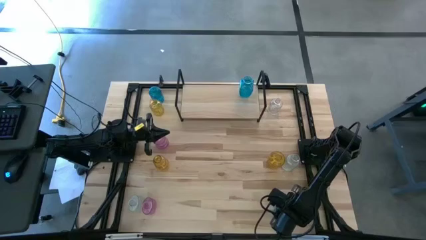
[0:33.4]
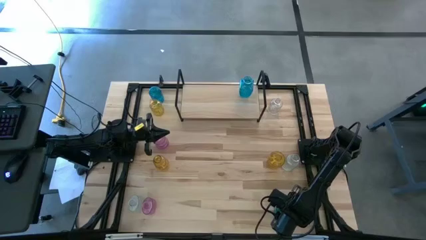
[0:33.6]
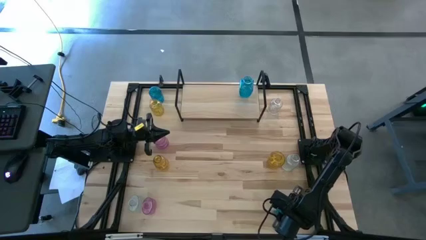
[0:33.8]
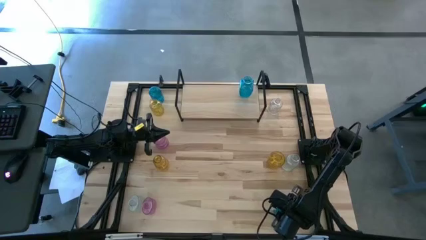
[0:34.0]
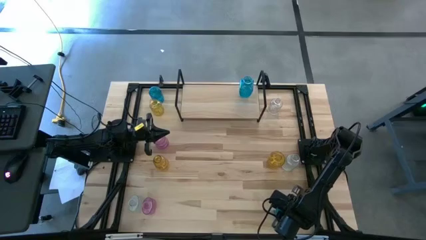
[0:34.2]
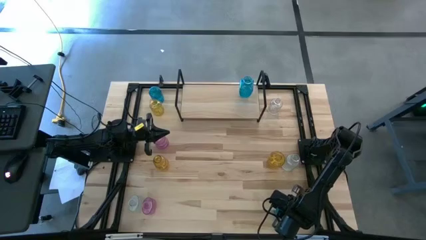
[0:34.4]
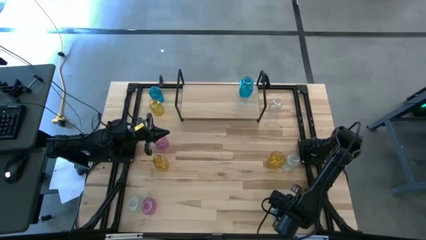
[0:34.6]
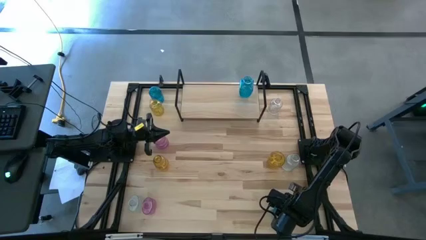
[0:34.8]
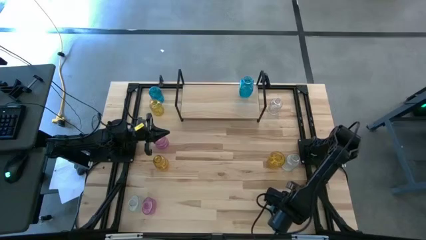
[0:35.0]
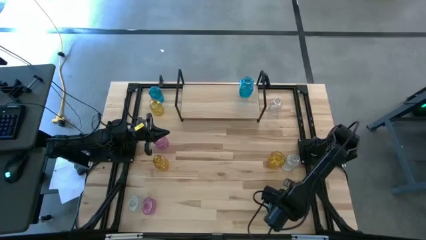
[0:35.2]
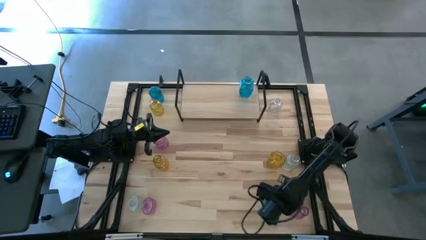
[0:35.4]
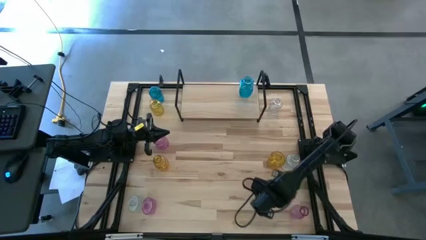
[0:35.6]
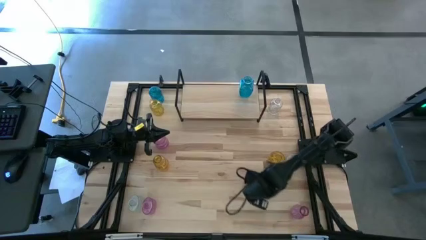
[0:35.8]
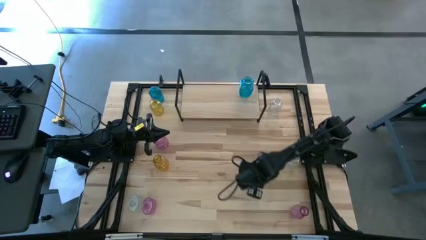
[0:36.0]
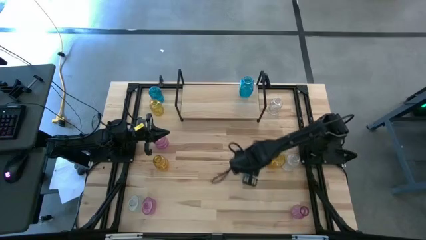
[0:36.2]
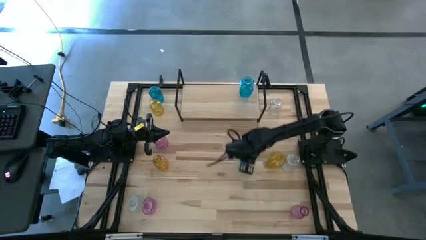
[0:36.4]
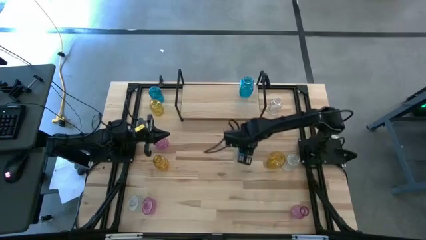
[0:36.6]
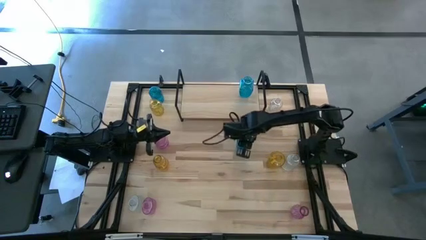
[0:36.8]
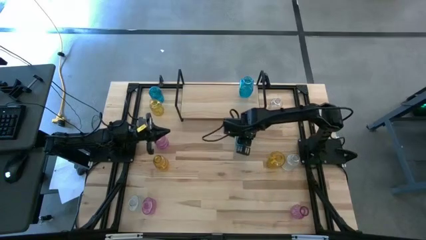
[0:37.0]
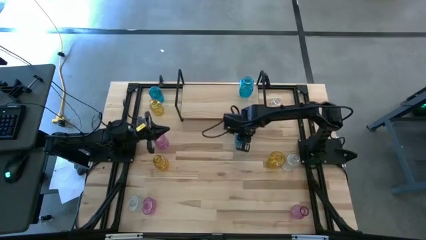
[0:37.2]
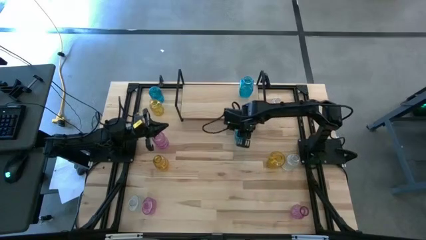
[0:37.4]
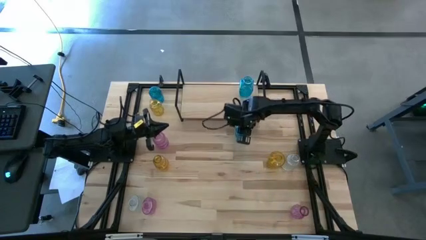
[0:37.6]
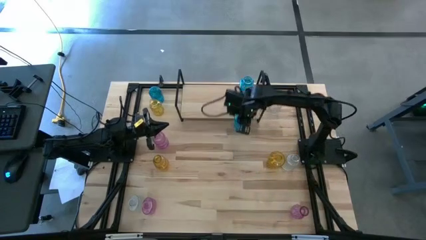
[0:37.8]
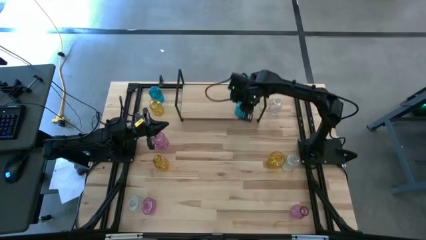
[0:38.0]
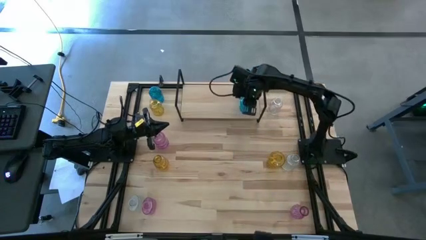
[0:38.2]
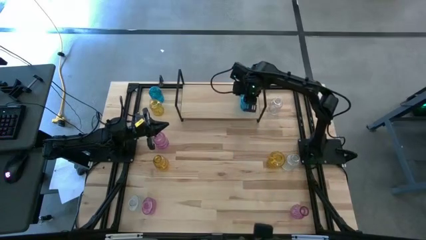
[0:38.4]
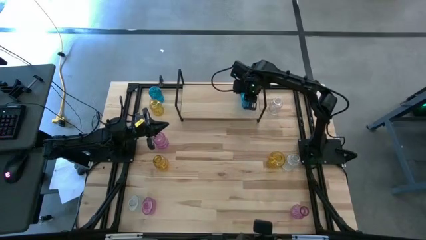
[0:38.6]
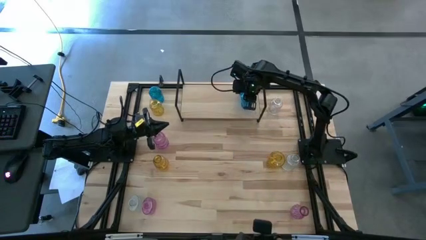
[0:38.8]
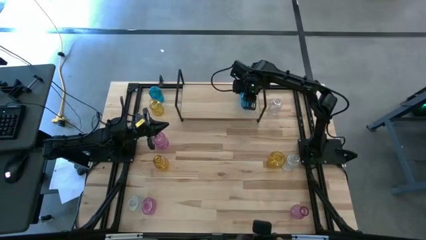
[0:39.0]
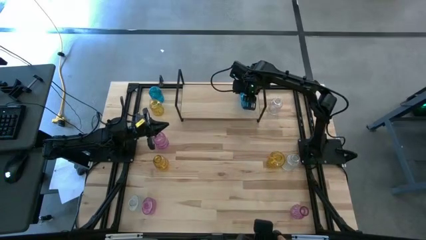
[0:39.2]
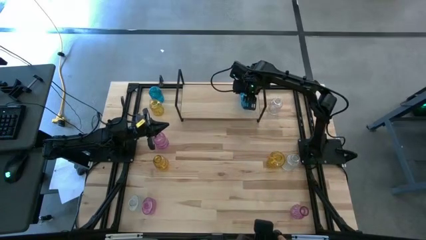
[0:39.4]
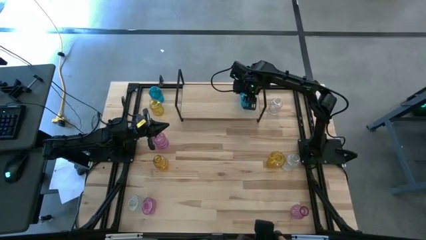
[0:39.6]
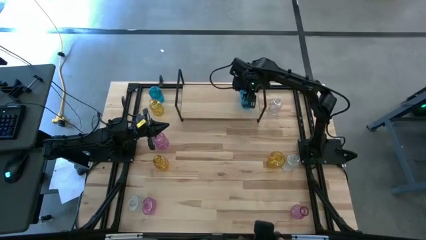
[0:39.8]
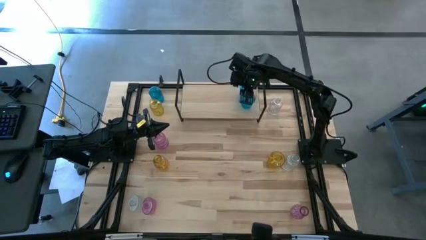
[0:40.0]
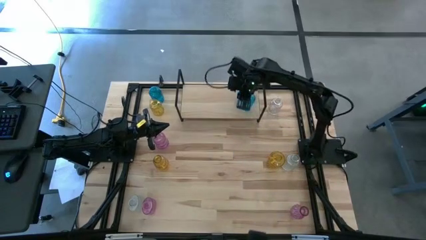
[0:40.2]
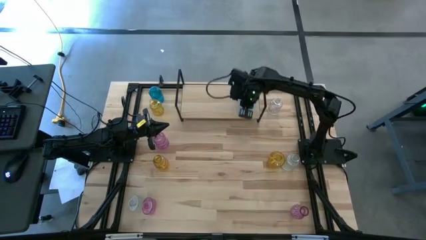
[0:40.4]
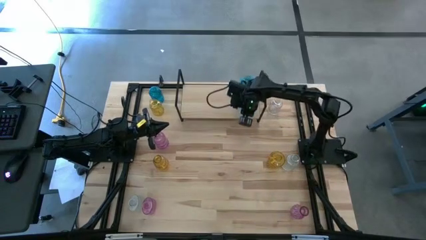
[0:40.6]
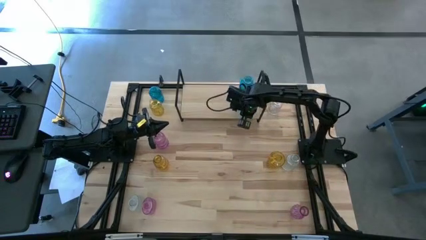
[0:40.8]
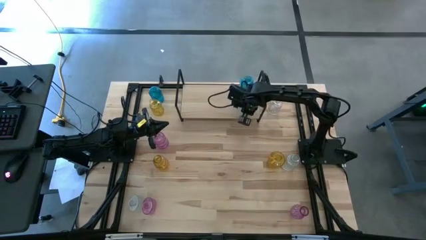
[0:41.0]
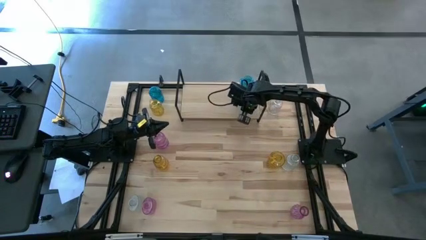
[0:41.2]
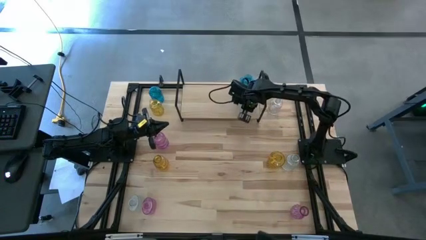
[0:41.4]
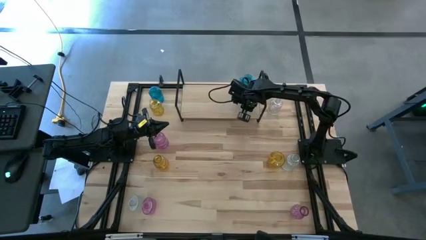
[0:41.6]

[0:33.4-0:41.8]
Task: sort vases onto shelf
Put the bottom blue vase aligned with the other blue vase on the shelf

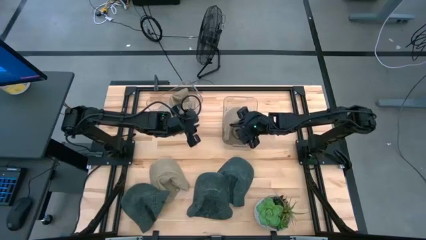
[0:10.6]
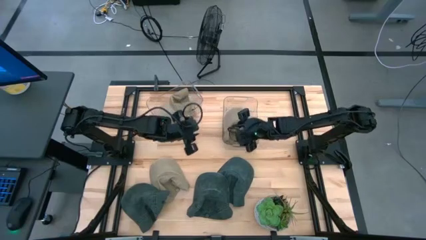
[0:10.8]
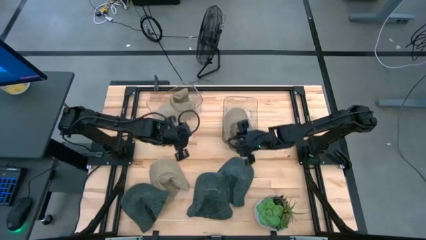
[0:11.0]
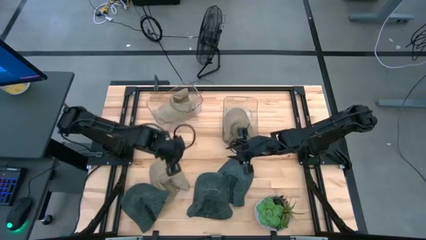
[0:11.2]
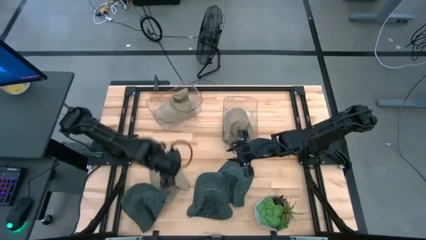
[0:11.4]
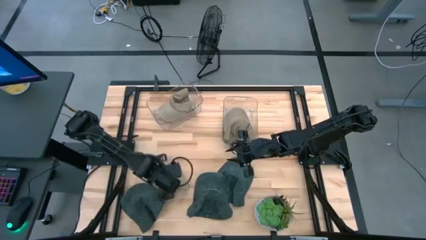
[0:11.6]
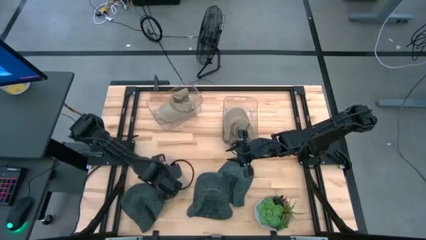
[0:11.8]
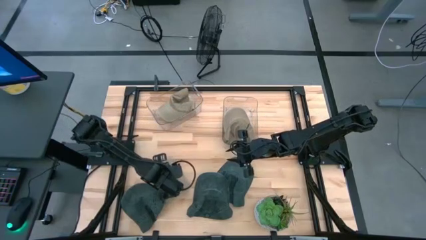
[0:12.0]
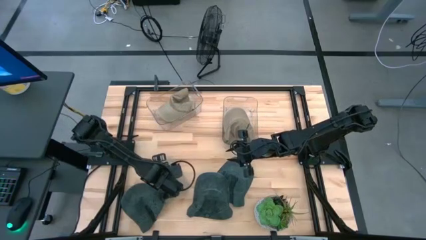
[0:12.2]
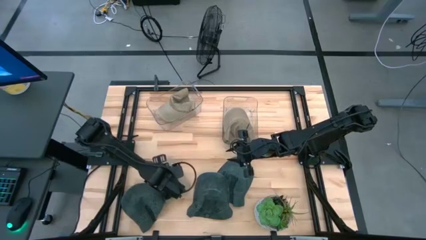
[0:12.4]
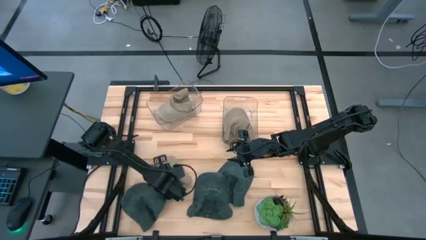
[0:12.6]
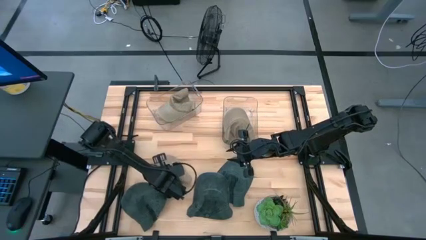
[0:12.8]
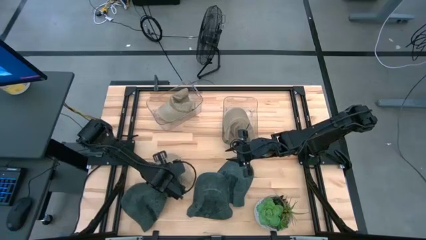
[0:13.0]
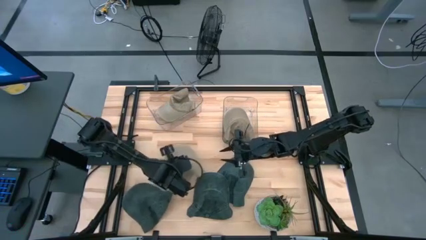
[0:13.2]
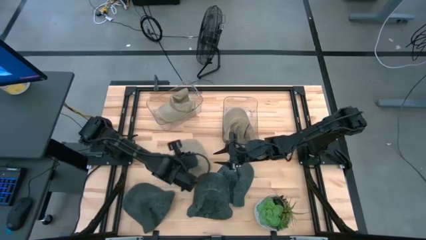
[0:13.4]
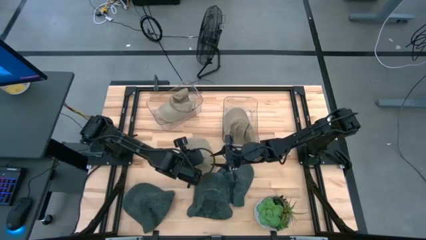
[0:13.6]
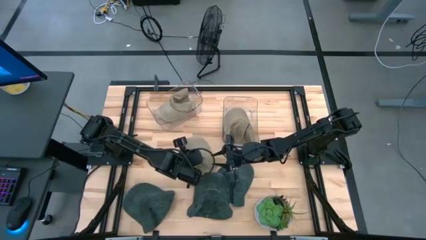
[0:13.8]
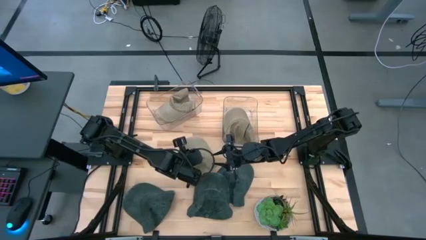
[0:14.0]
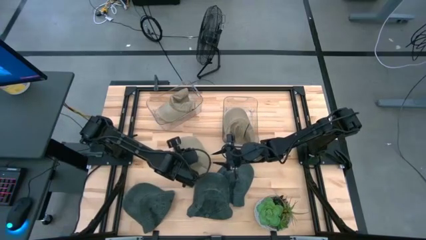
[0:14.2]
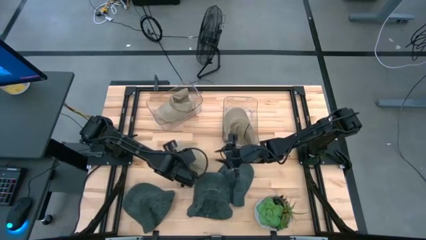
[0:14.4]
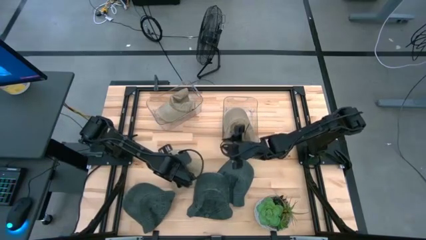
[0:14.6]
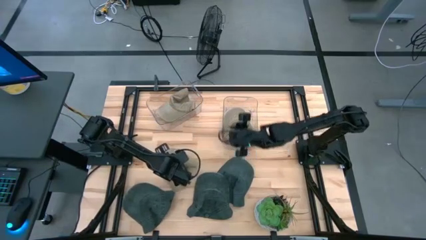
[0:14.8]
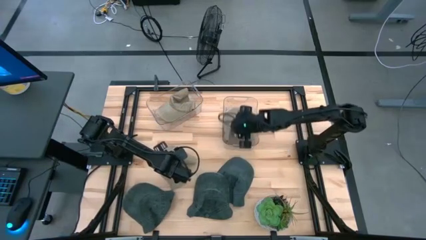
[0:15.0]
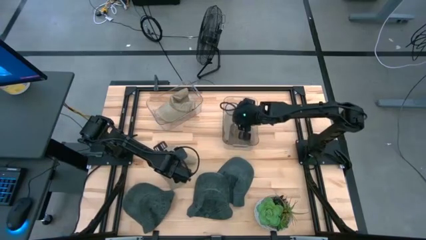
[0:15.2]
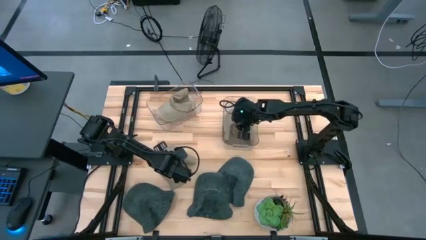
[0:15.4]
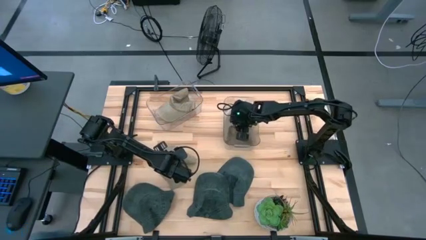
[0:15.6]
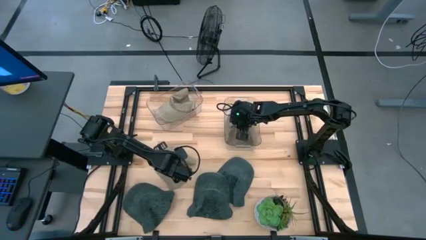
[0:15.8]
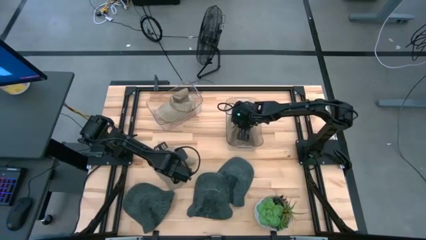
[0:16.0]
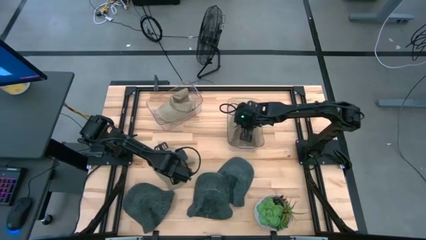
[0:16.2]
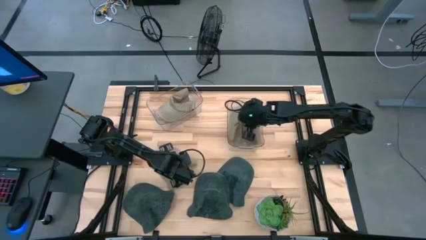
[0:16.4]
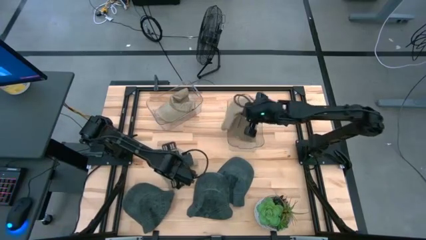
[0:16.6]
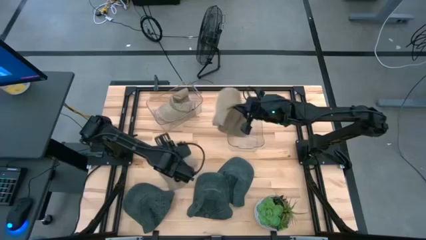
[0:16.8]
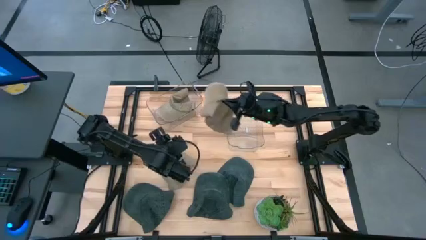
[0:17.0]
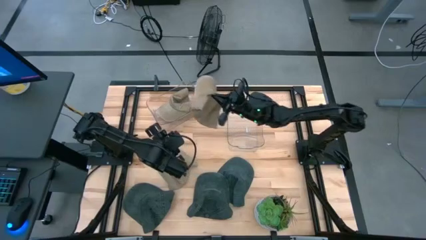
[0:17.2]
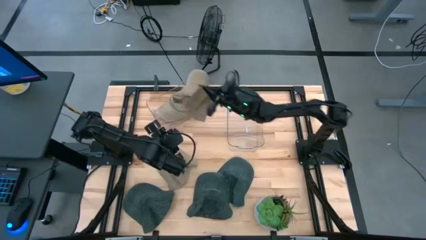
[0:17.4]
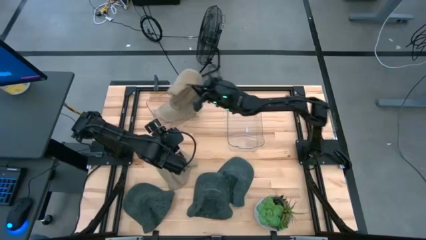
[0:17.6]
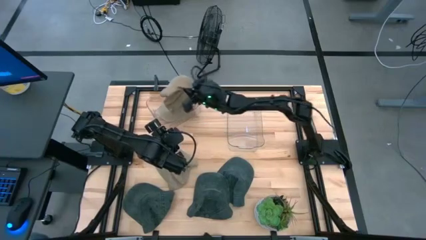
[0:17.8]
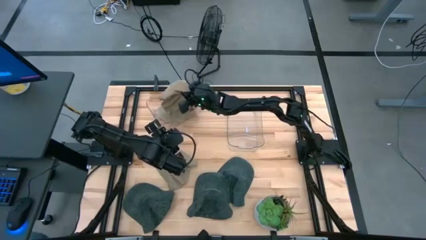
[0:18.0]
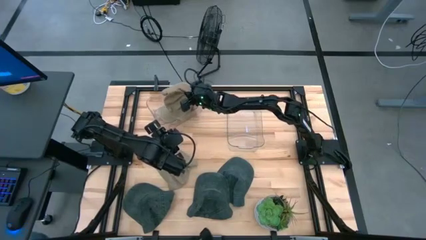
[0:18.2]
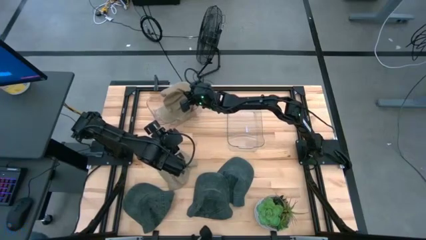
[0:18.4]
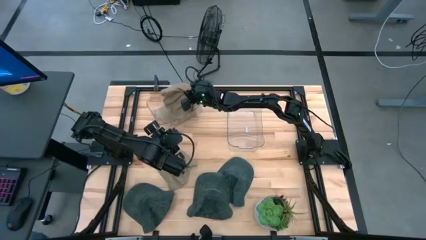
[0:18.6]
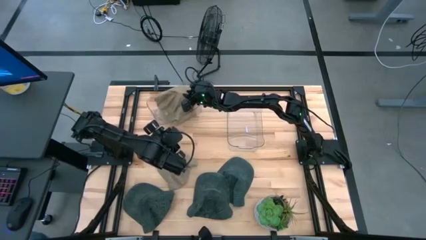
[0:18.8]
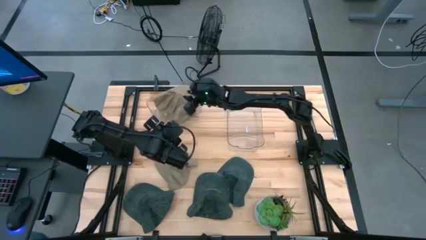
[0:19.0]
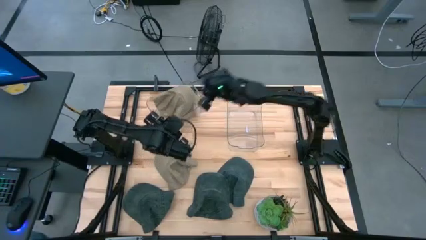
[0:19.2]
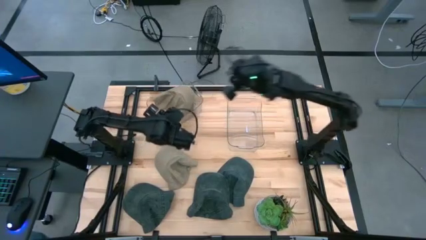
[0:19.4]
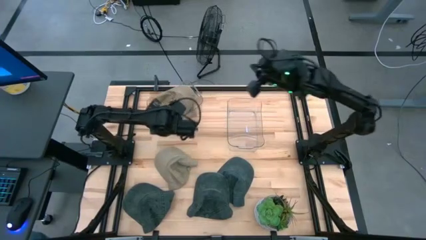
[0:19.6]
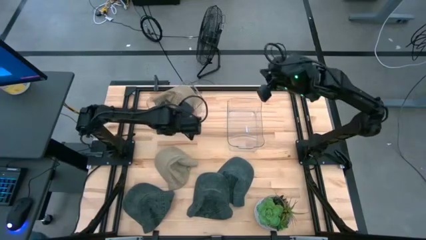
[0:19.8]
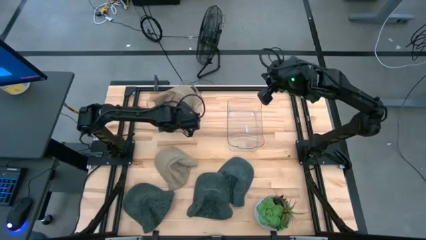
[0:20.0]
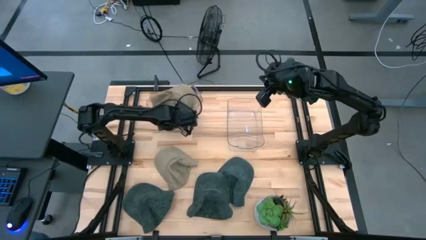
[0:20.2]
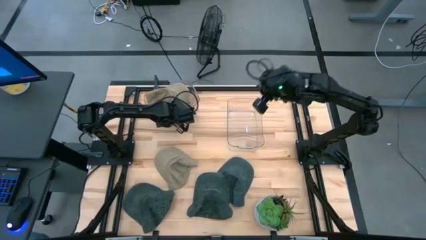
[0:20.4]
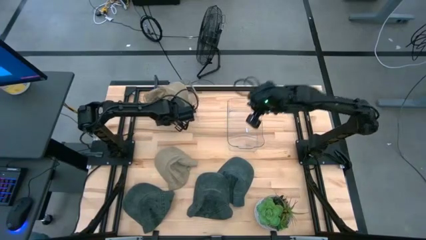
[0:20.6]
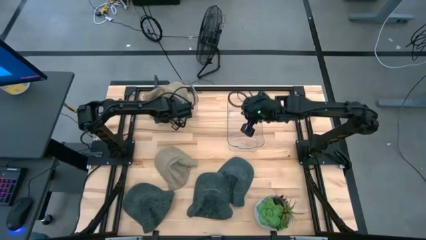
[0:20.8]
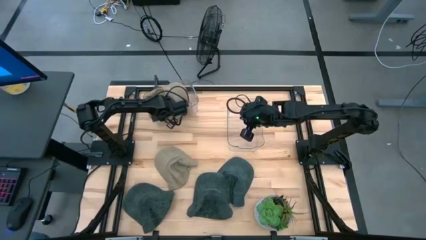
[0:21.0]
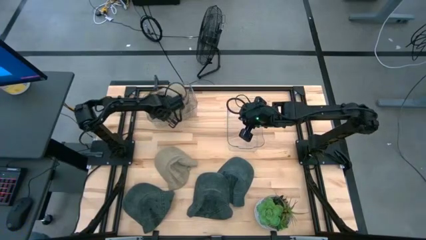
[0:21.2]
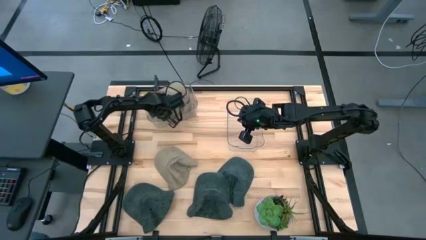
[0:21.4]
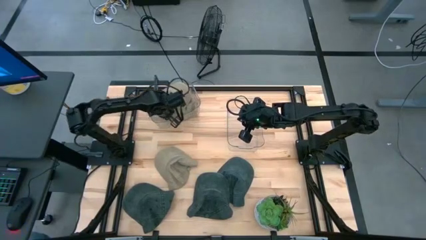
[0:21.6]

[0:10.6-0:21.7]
Task: Pick & Place hat
Put the right brown cap into the left transparent bin
